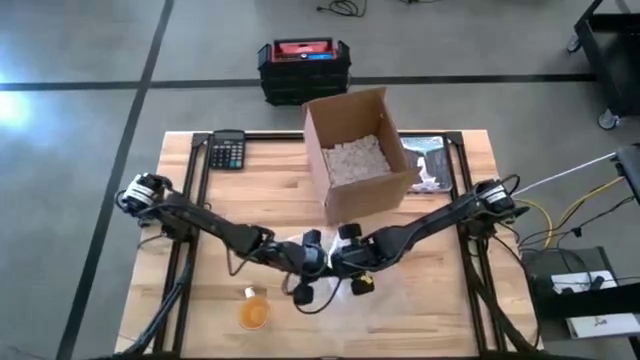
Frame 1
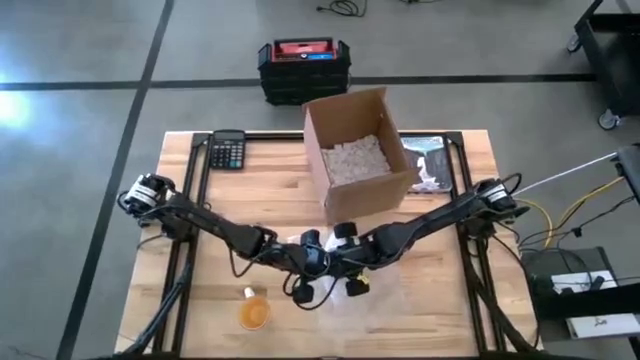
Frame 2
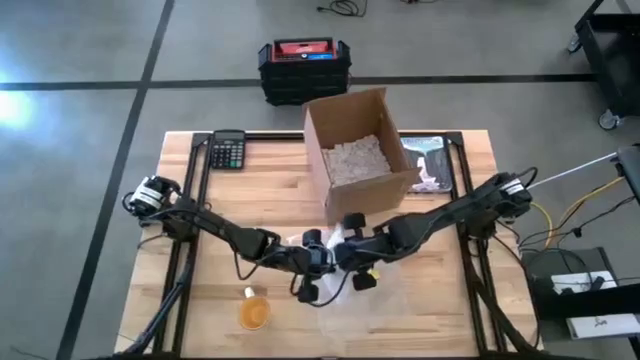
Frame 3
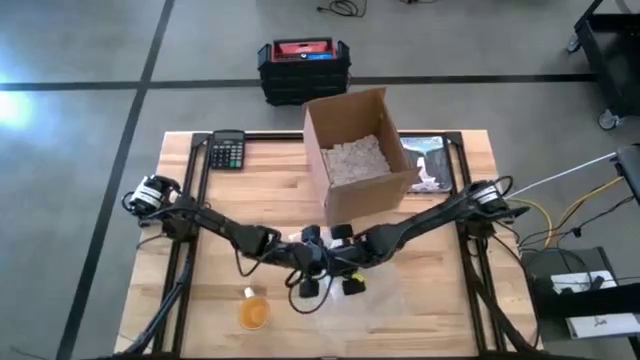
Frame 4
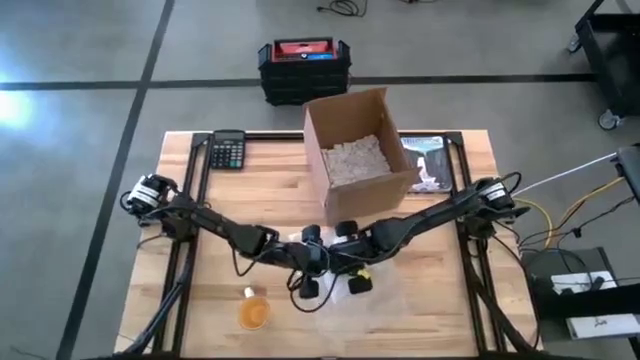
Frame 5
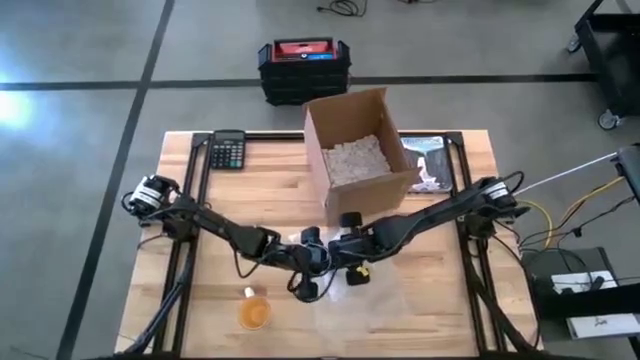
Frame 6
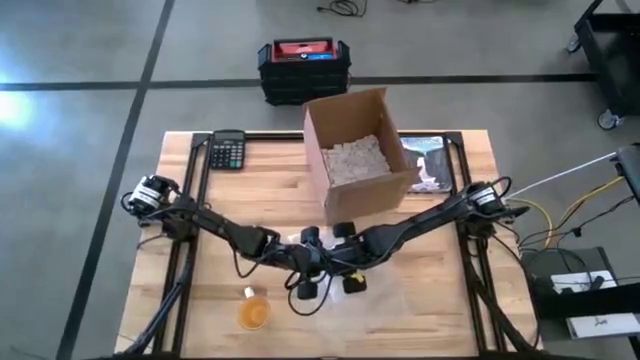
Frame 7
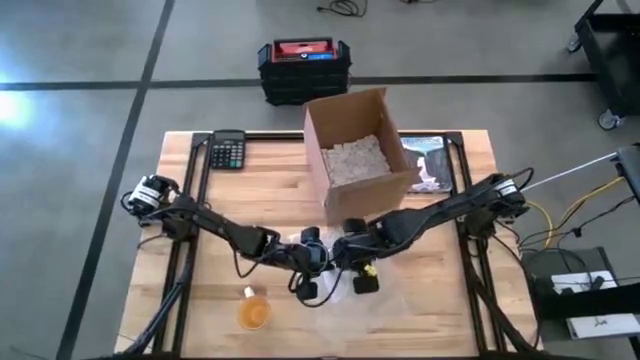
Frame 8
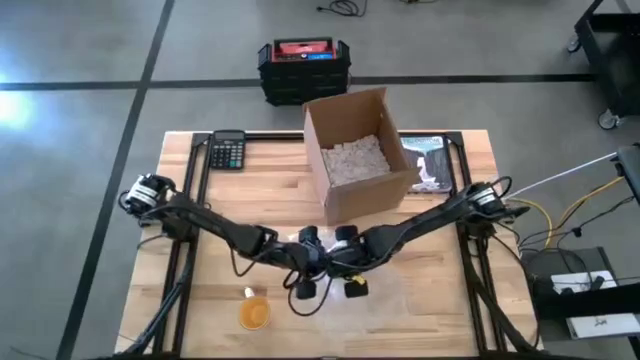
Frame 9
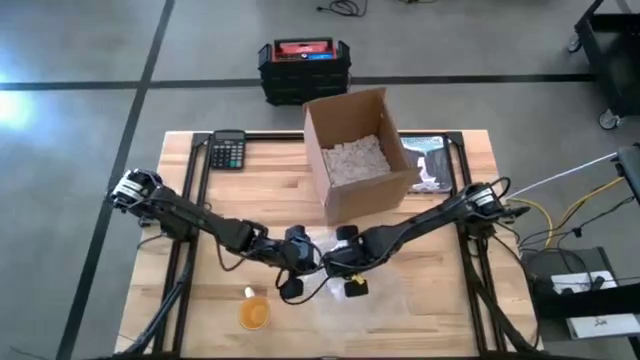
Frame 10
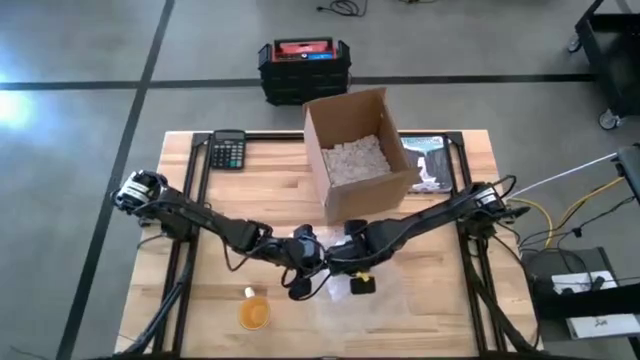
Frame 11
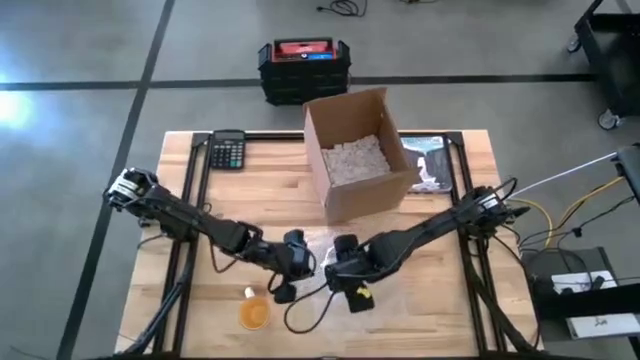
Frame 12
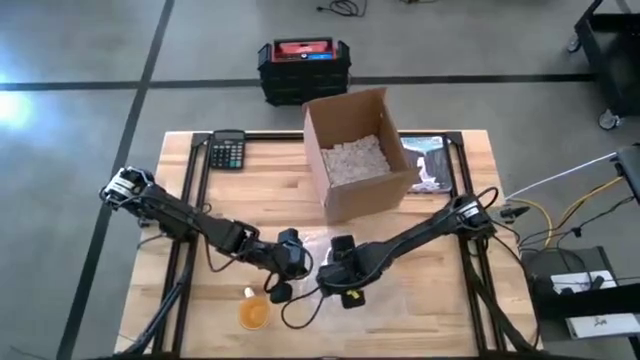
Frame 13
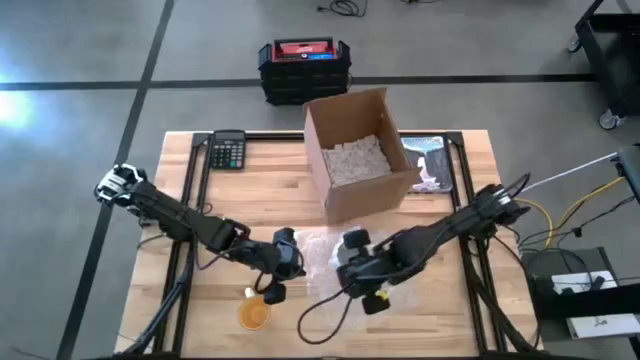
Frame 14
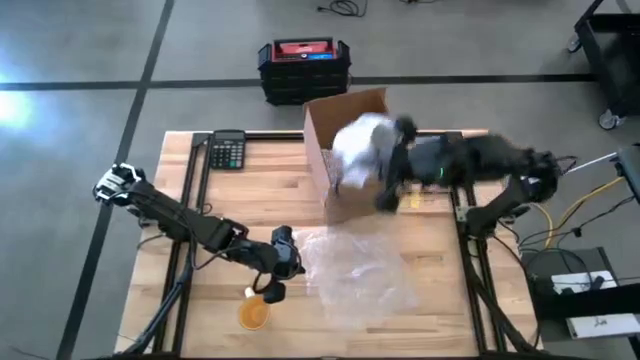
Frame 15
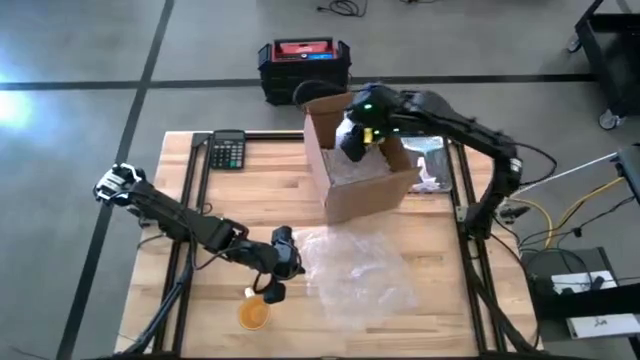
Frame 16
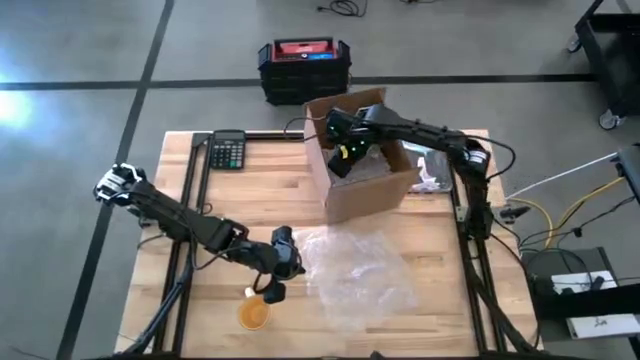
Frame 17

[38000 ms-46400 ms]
Task: wrap mug
Put the wrapped white cup into the cardboard box

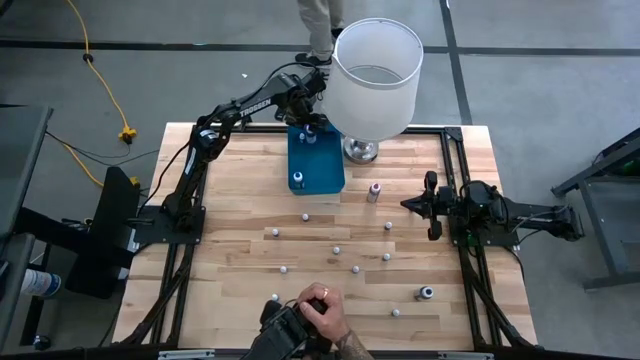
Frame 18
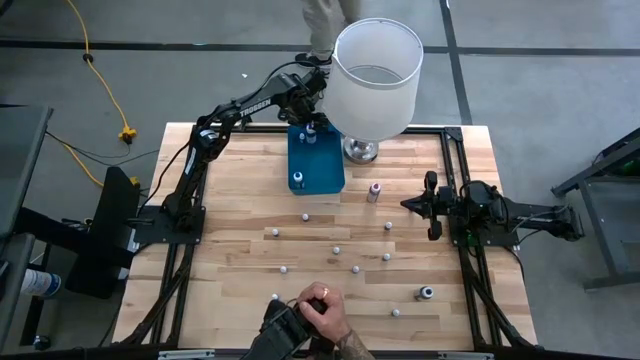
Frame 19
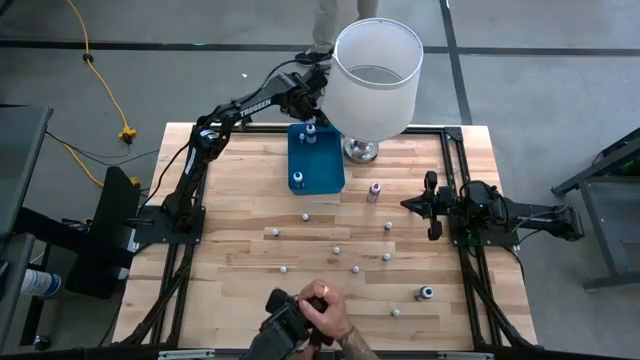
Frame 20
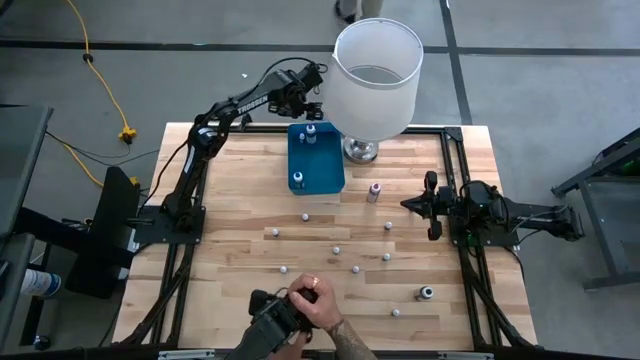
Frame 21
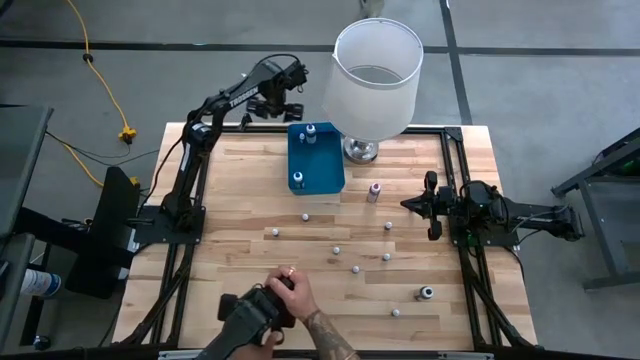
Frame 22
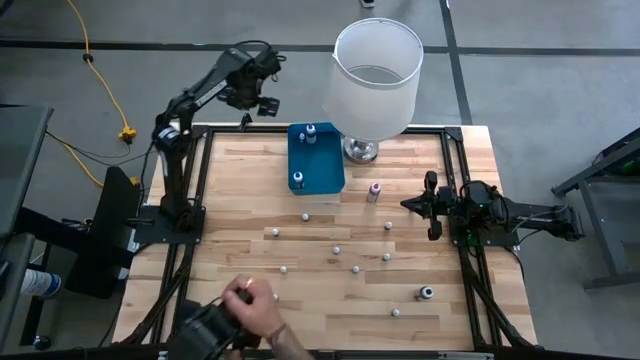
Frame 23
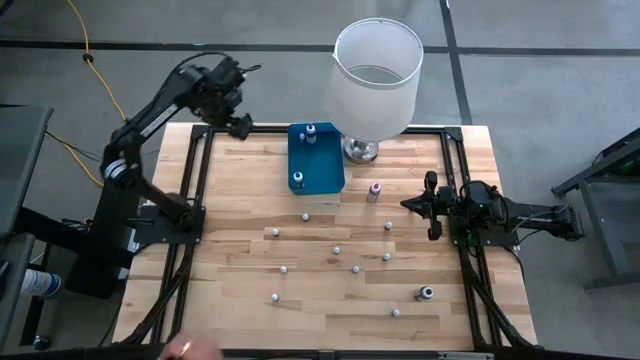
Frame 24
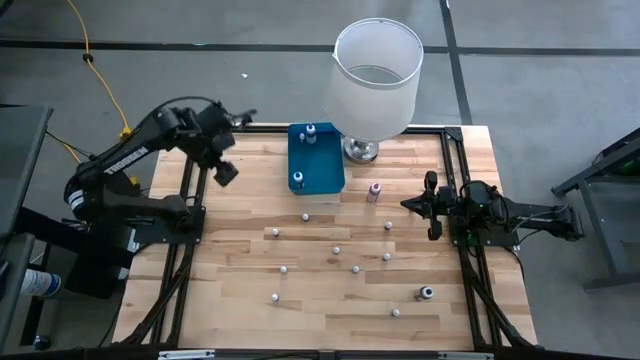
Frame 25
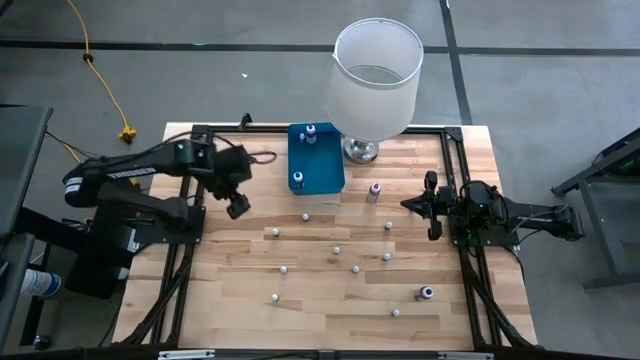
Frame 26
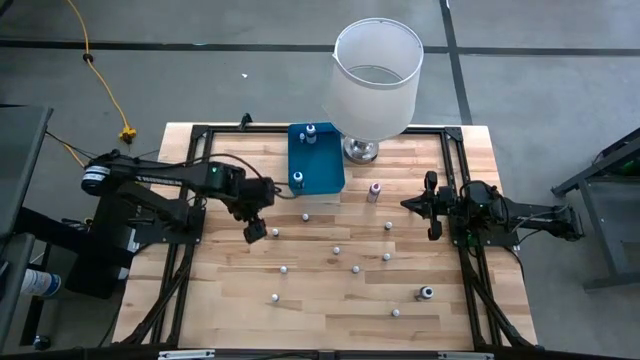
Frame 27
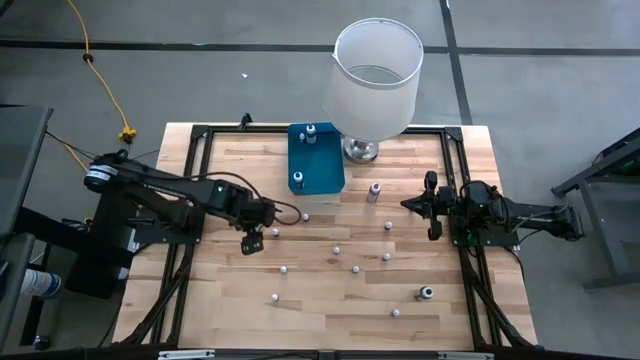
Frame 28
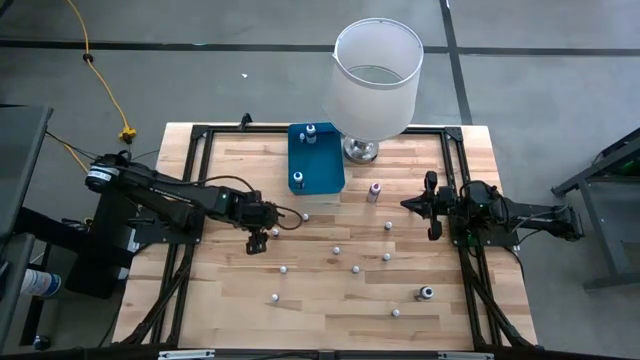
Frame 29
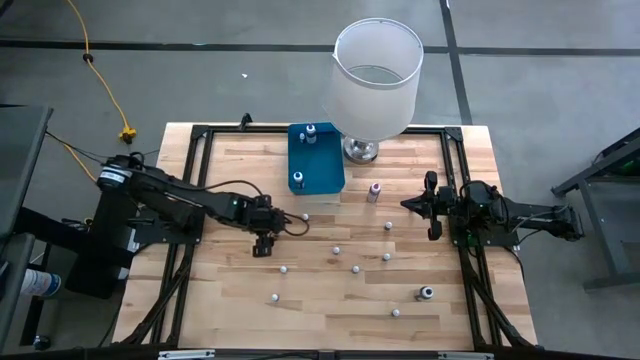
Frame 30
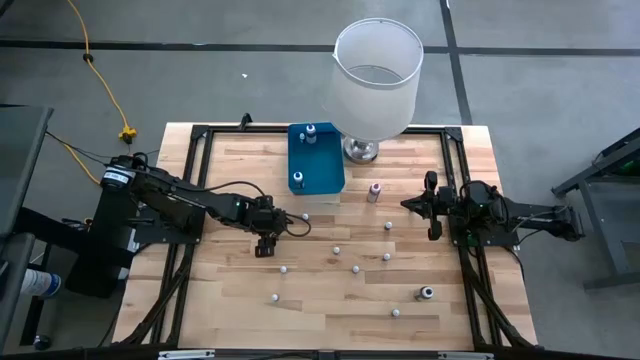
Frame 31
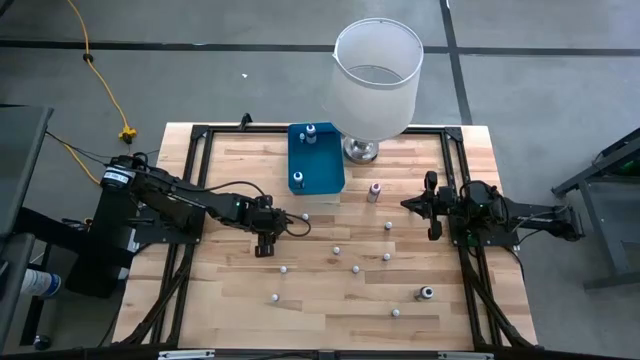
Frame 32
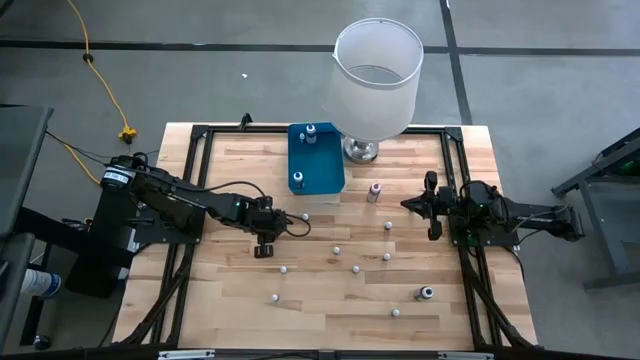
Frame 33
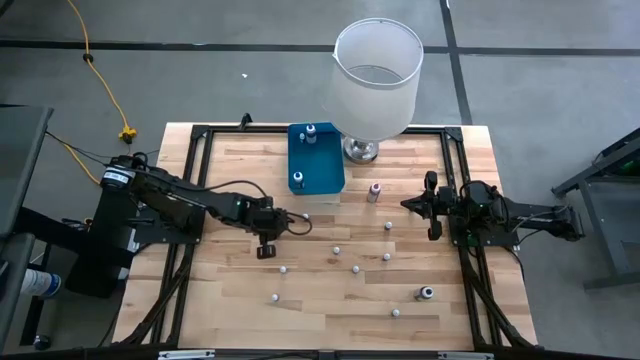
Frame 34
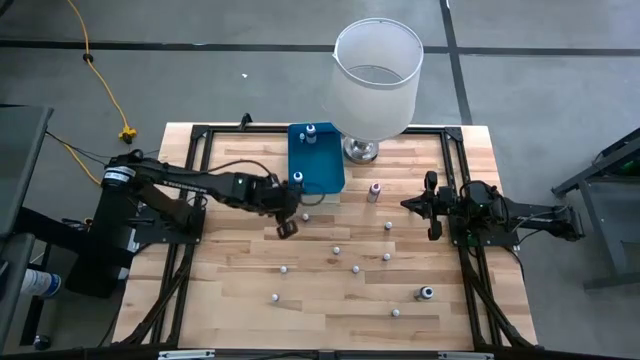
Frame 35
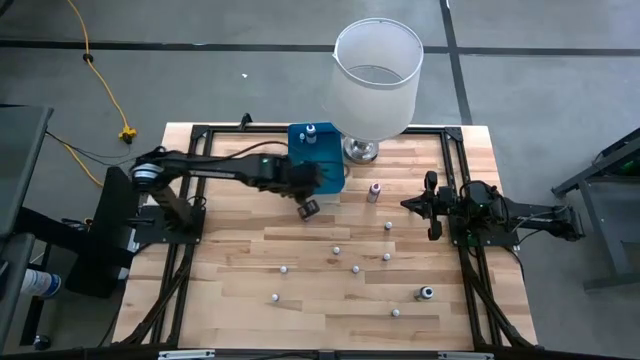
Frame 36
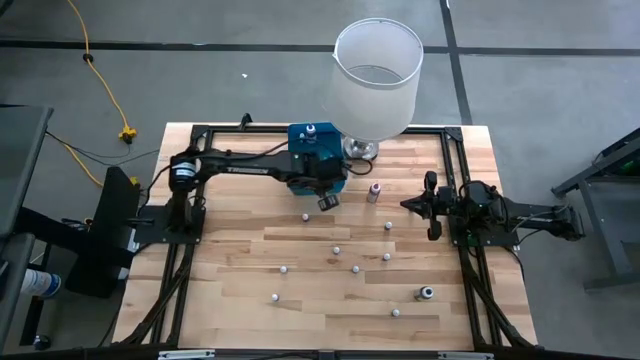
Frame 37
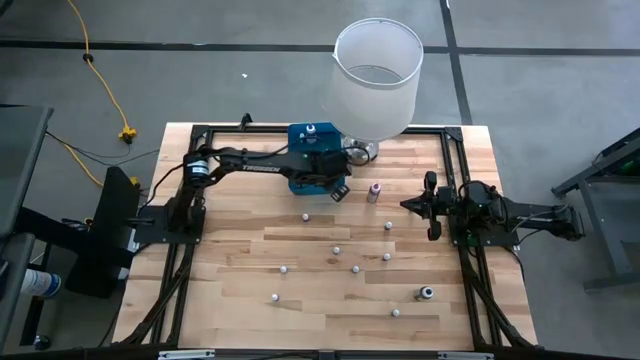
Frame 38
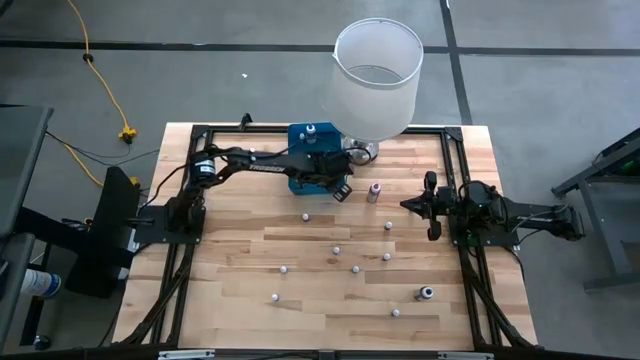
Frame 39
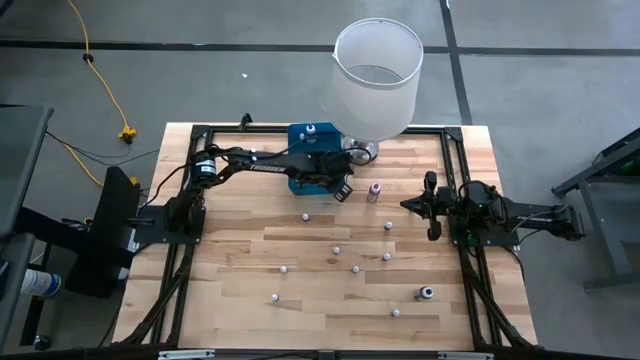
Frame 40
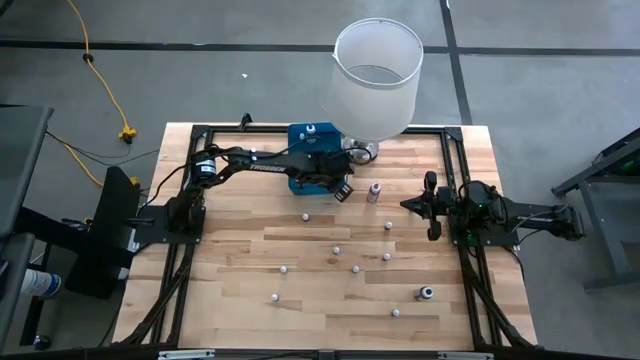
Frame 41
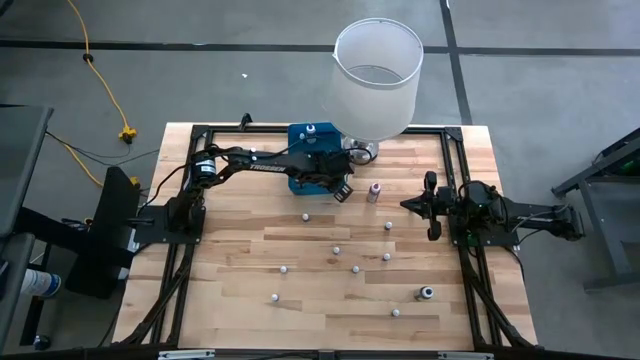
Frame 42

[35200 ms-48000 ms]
Task: Pick & Place food coloring
Put the small green food coloring bottle into the blue bin
